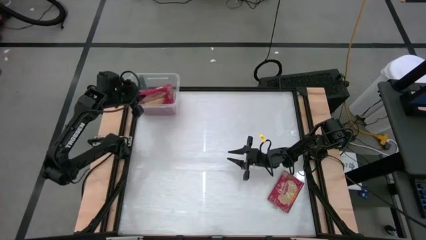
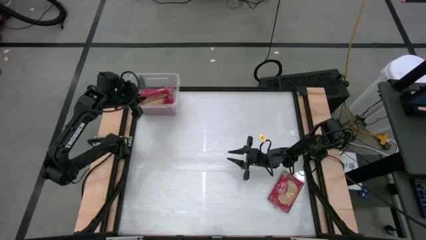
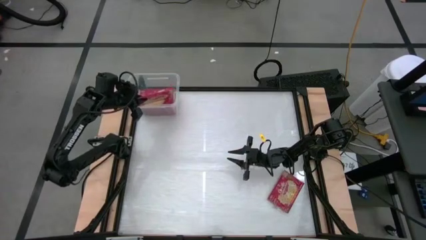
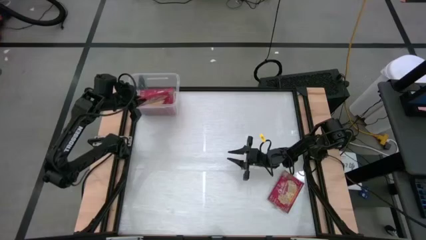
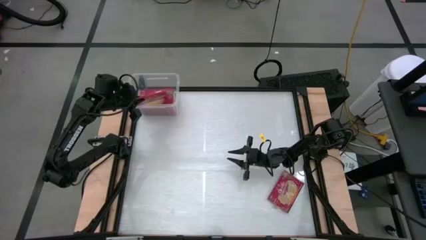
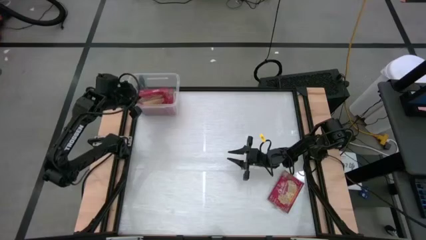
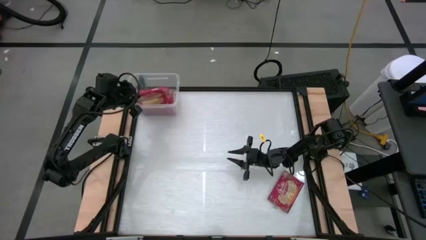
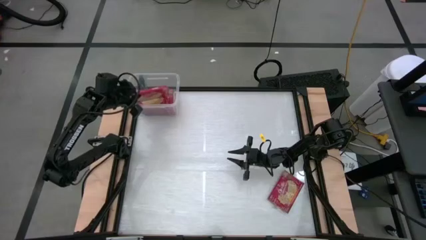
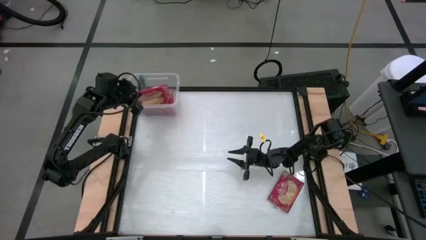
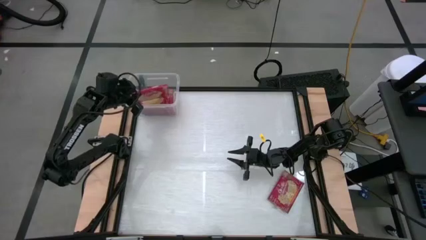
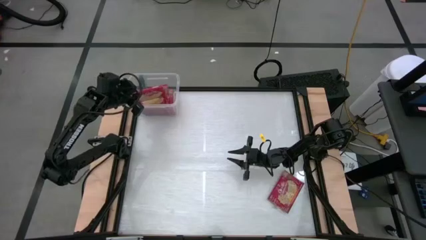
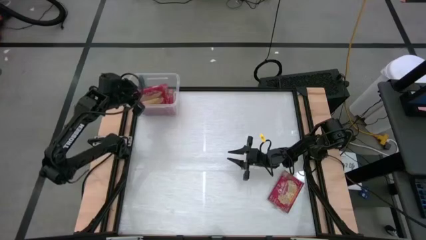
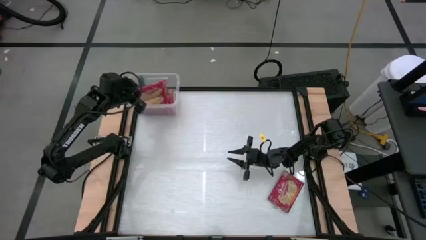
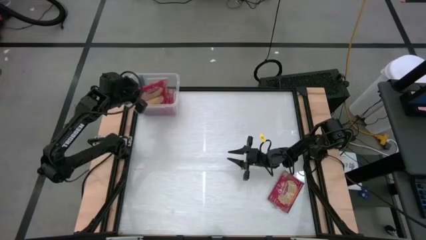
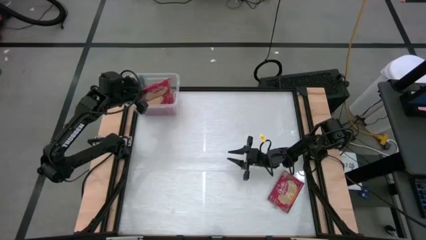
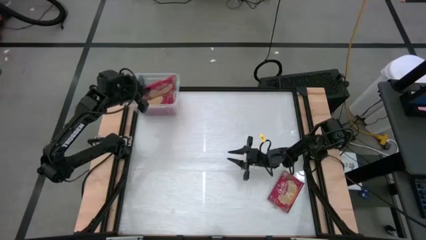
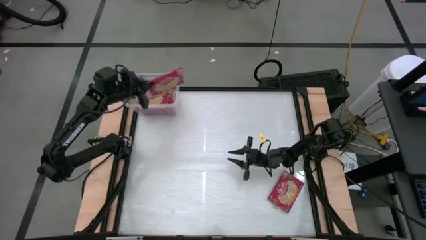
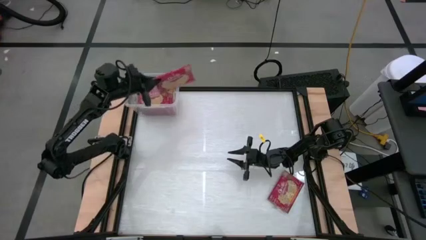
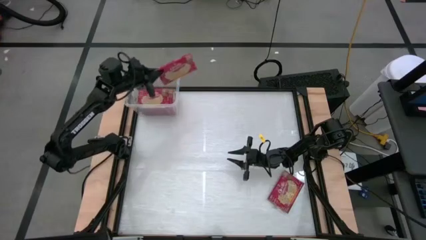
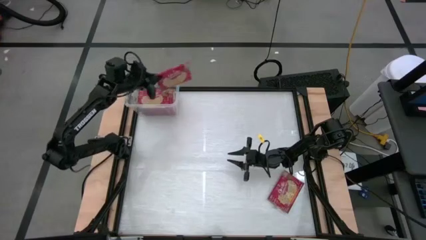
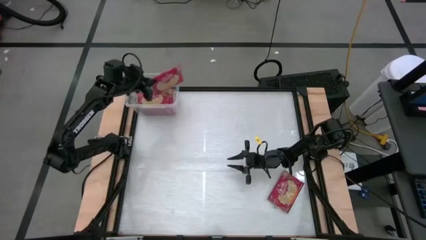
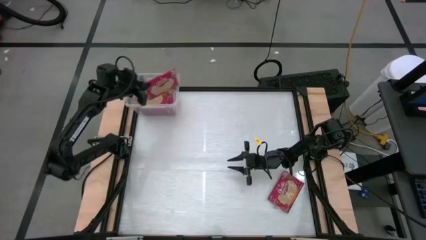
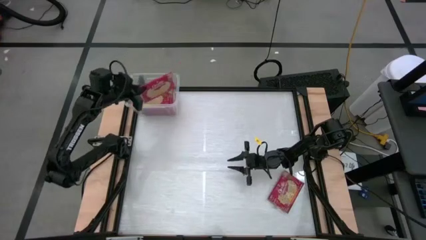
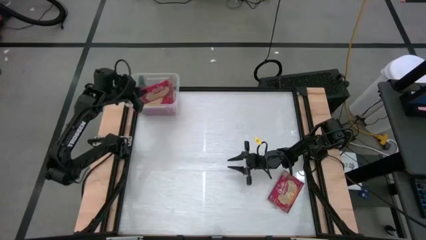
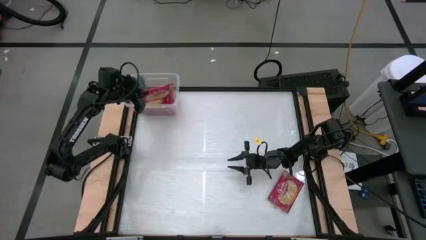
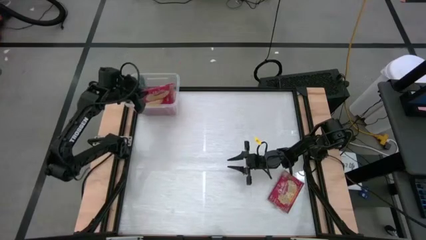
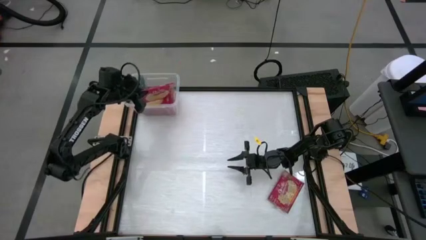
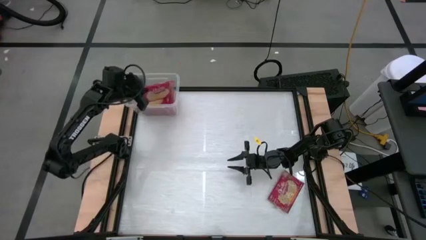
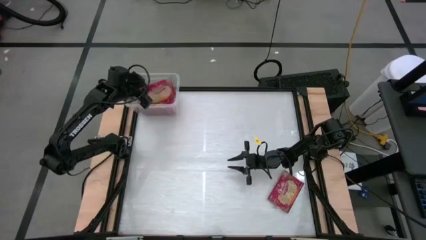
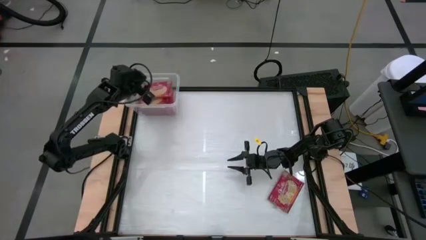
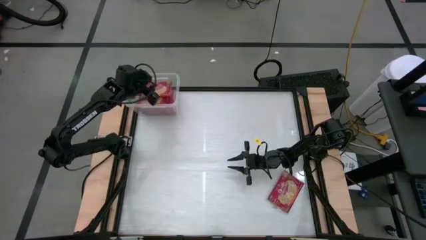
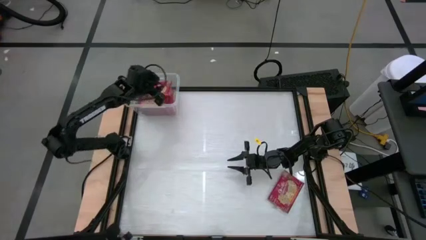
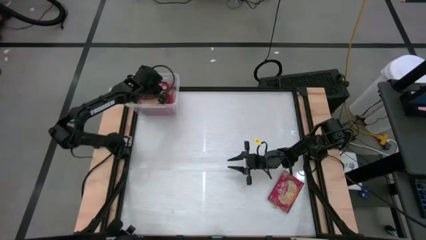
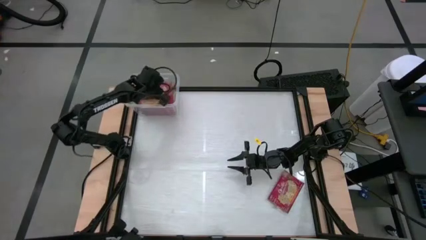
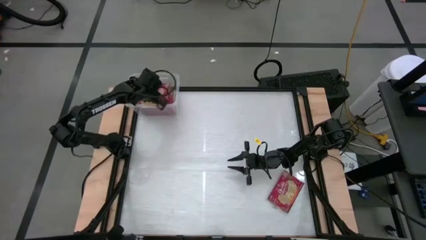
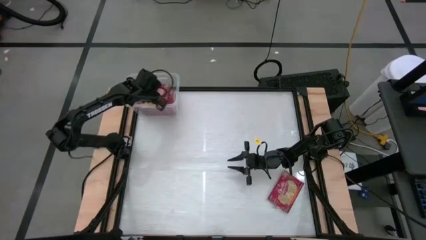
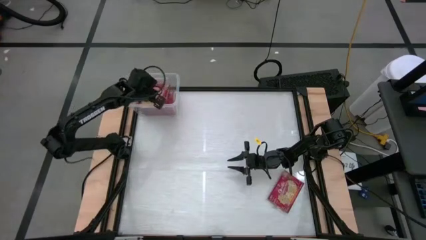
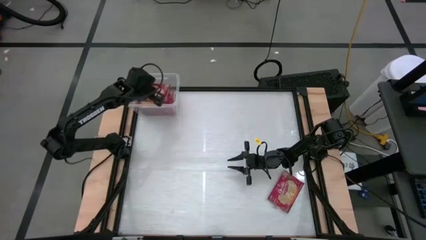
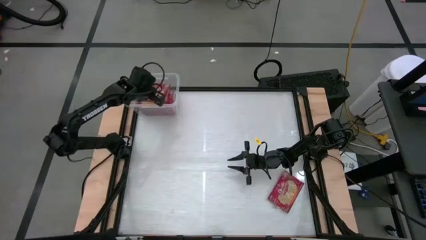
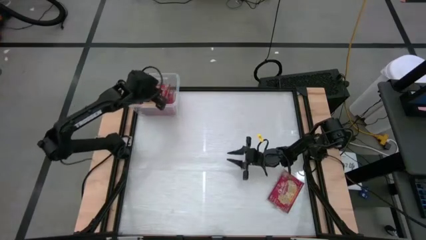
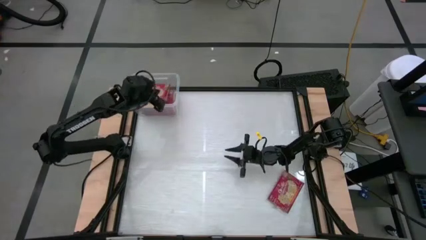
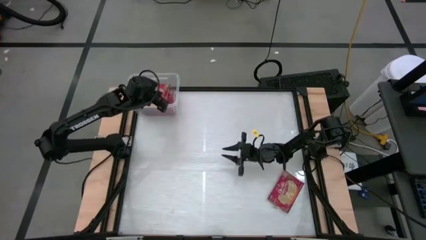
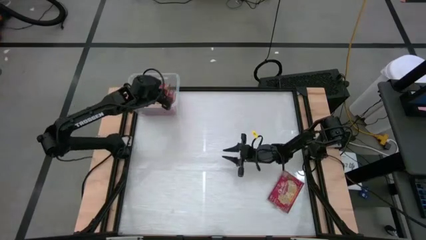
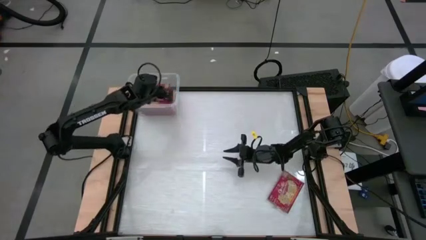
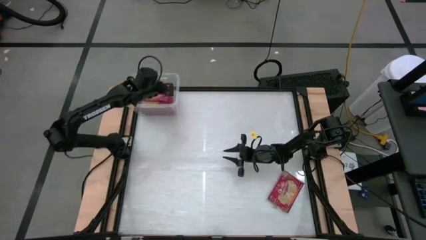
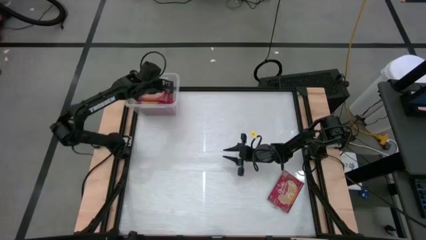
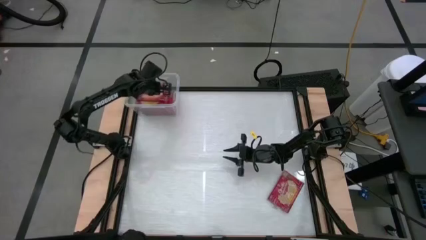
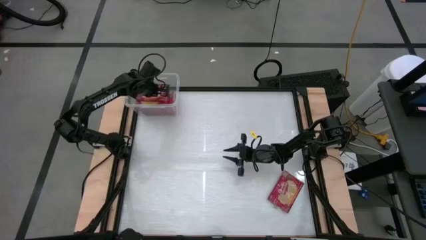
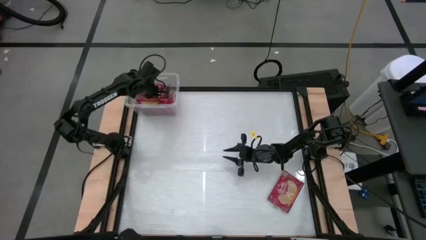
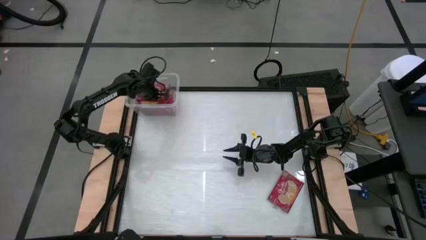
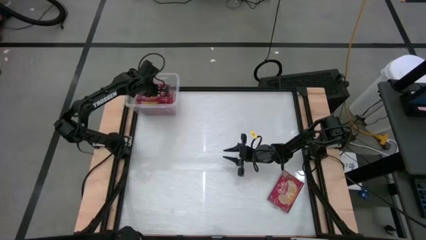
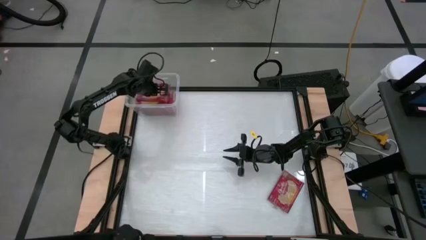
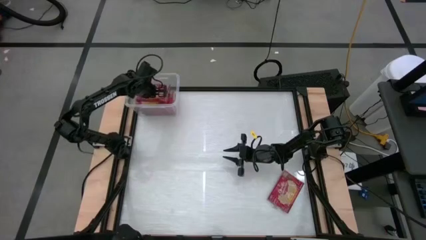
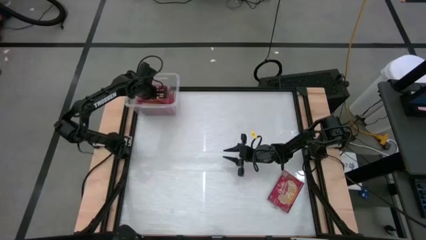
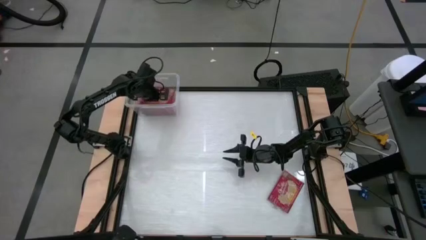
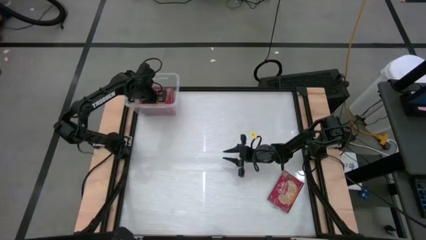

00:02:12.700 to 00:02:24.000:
Task: Sort popcorn bags into baskets
Put the red popcorn bag into the transparent container

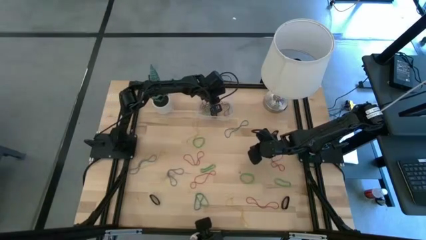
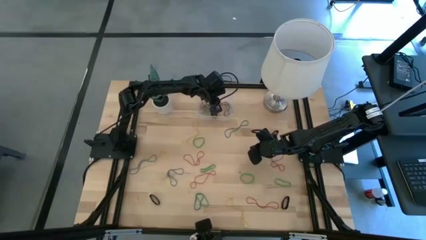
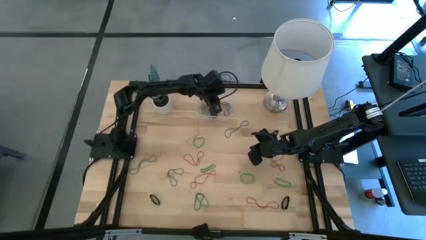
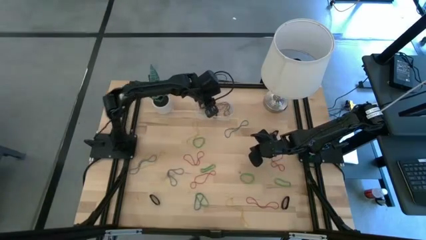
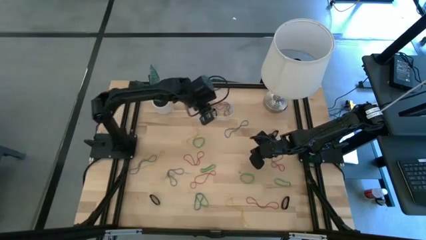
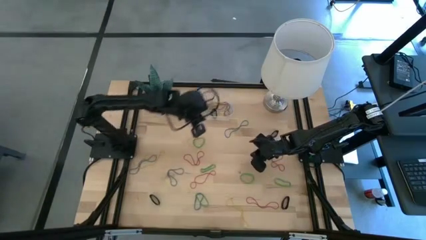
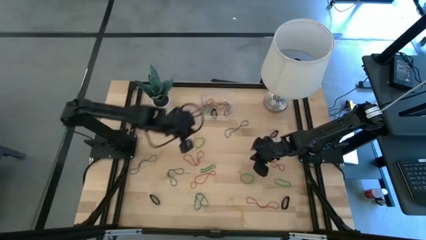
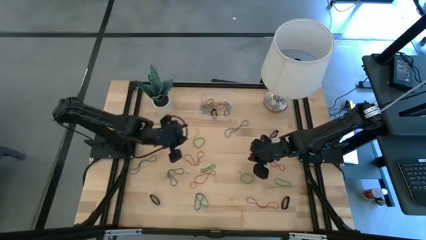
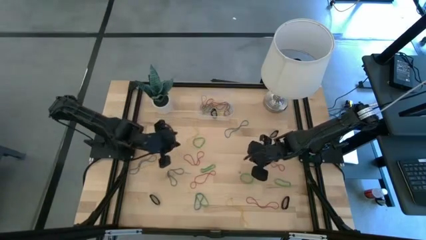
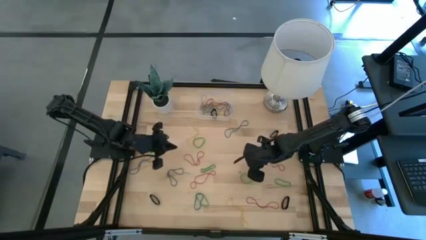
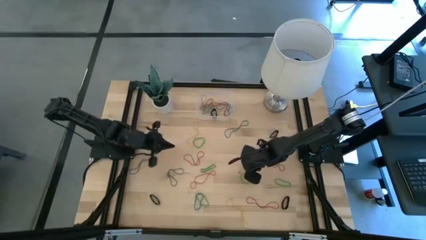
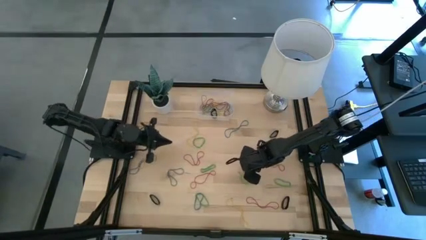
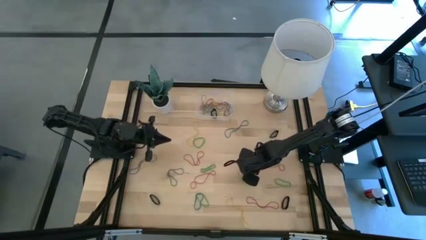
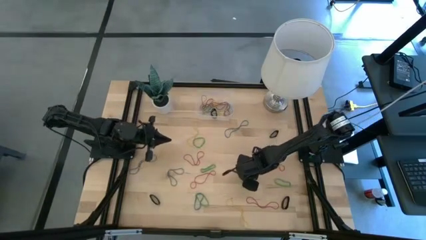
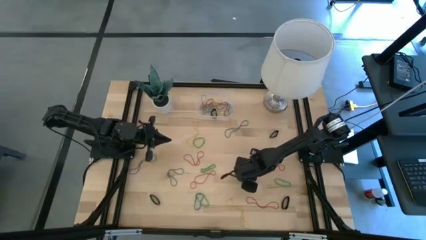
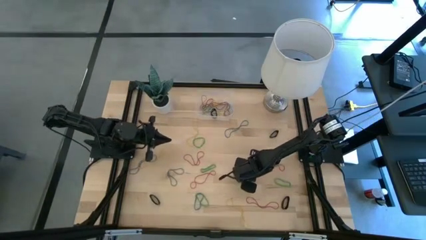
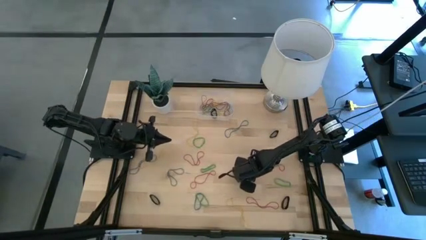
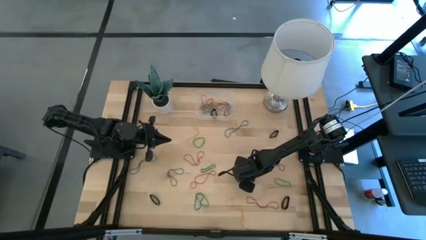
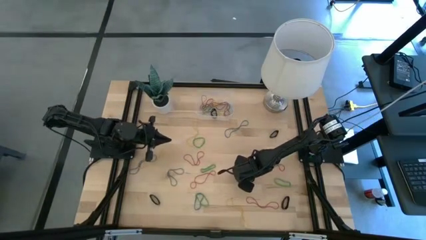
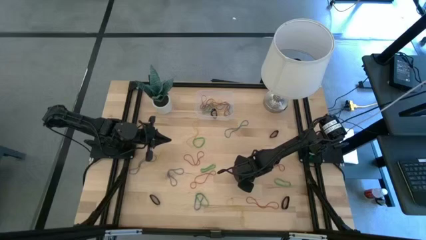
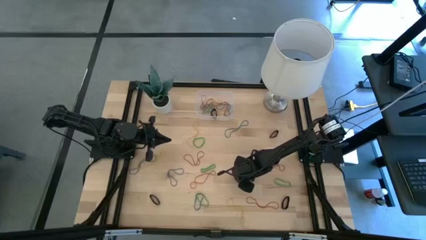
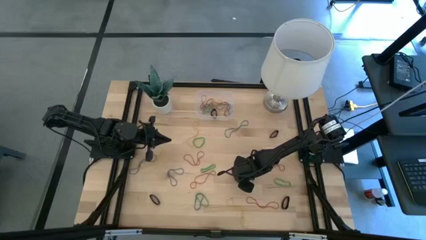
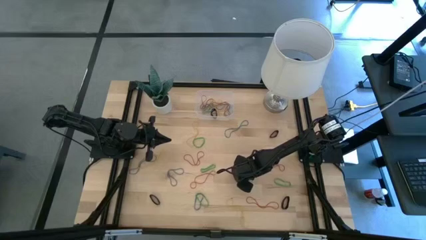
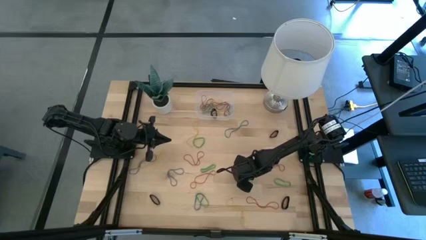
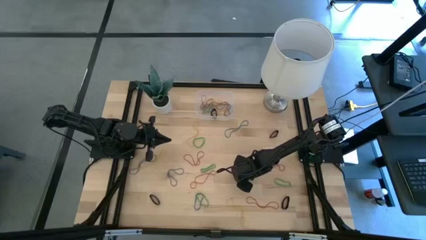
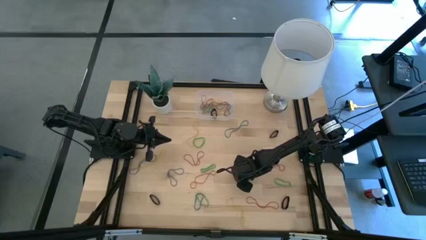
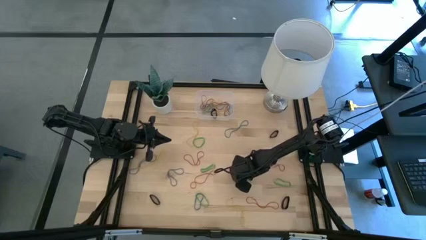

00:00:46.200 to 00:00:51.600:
Task: Pick and place rubber bands into bin
Put the green rubber band into the transparent bin
